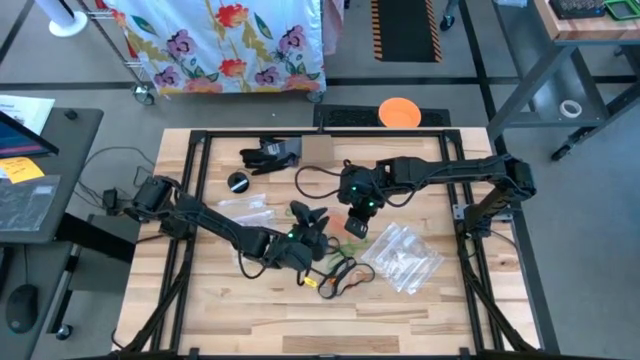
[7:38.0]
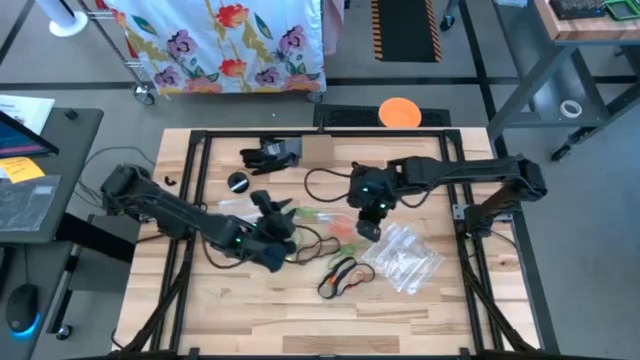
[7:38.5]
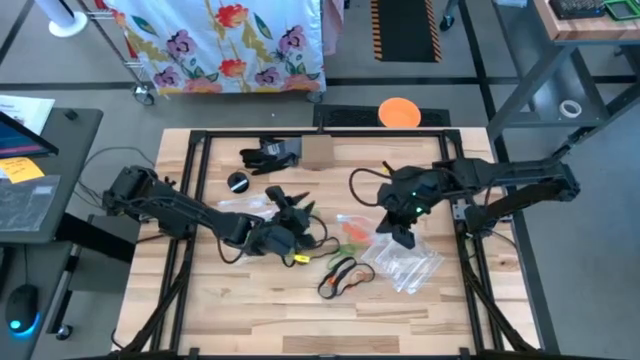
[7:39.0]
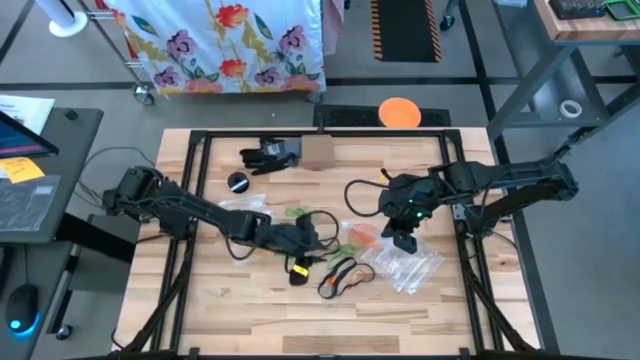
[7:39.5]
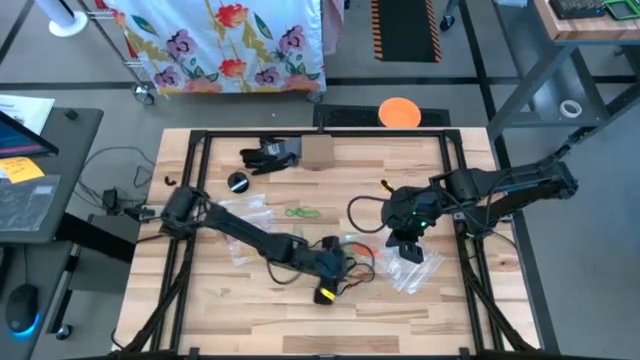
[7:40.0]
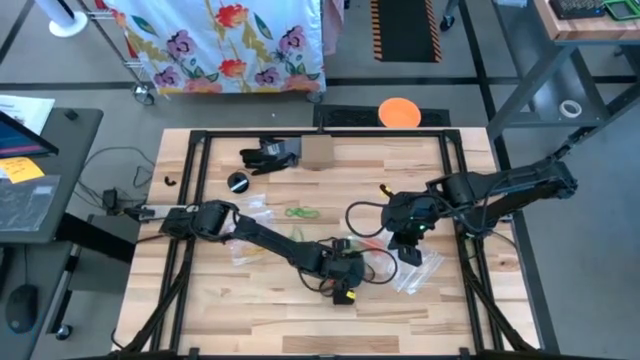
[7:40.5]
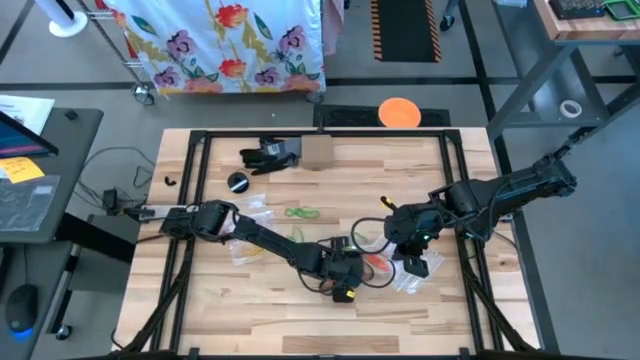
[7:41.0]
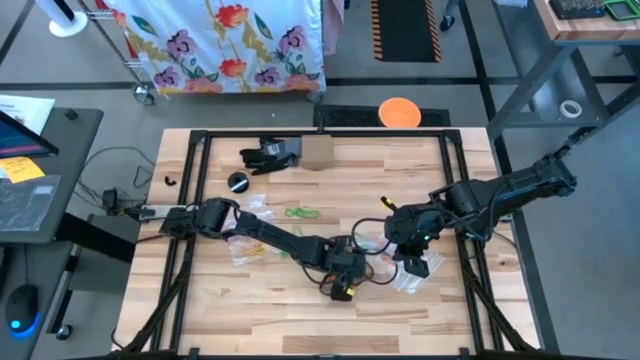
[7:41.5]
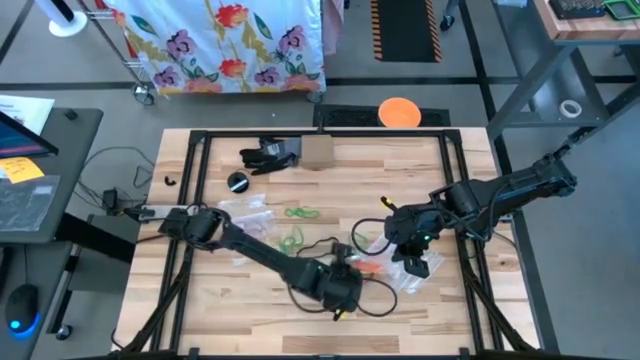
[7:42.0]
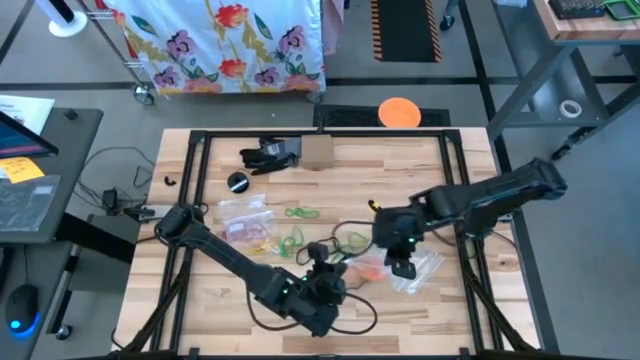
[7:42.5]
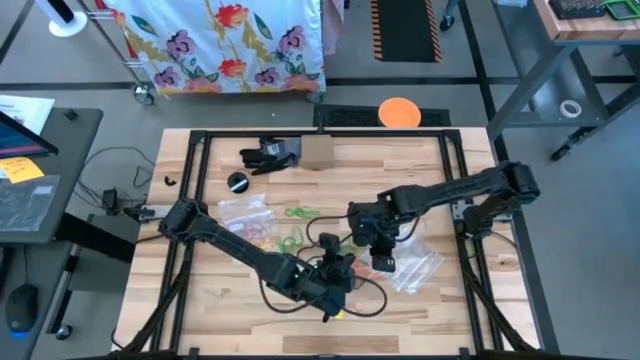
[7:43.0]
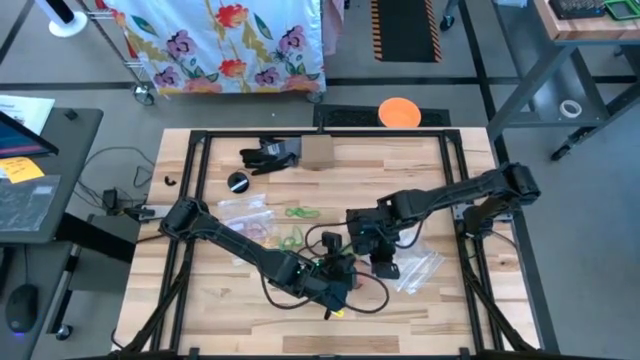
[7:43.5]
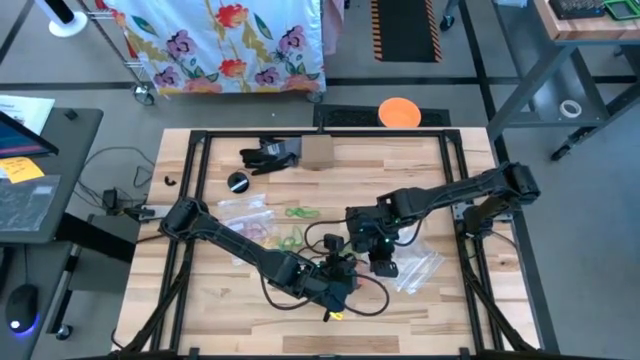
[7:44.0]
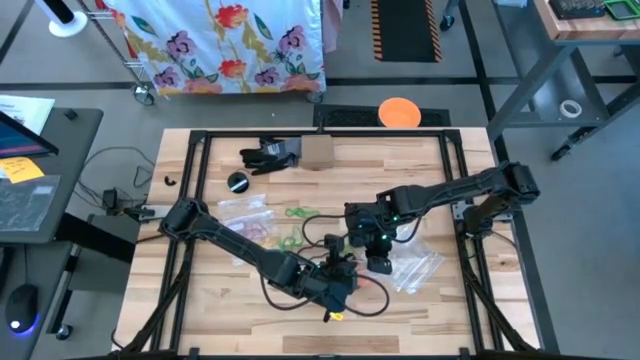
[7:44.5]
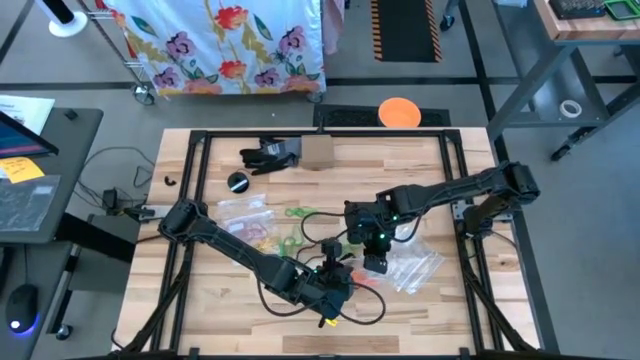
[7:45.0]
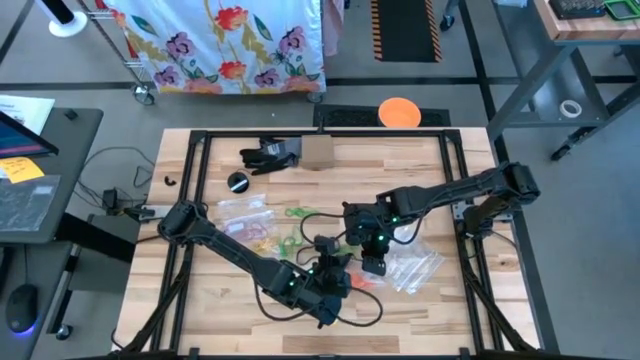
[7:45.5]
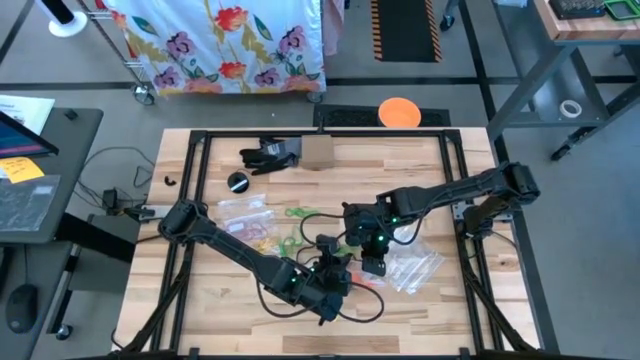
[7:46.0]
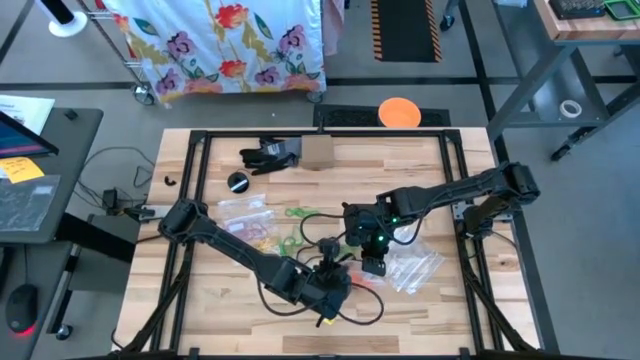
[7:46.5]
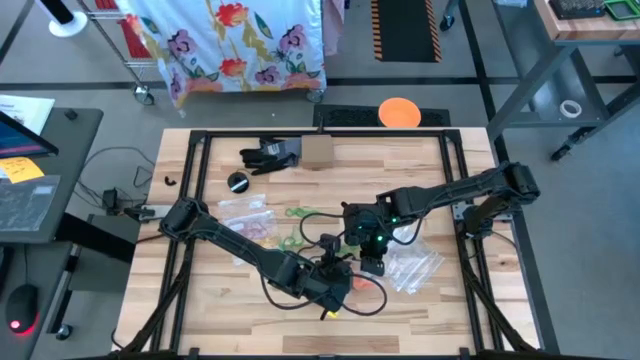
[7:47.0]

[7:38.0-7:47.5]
Task: Sort rubber bands
Put the orange rubber band into the transparent zip bag

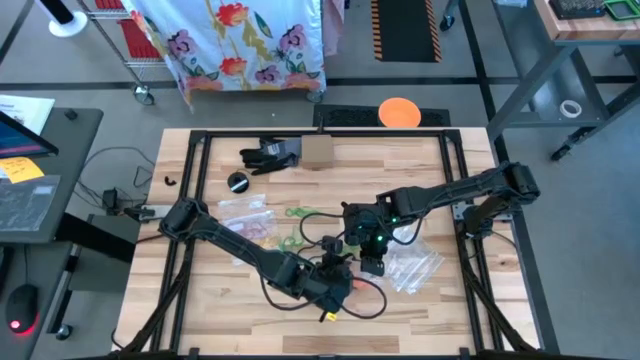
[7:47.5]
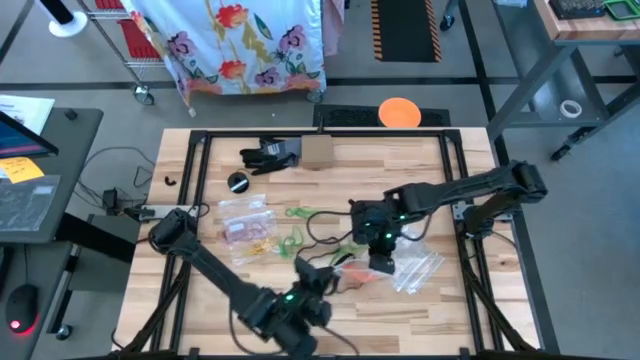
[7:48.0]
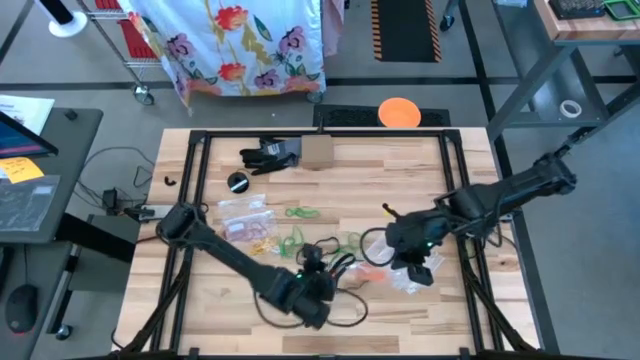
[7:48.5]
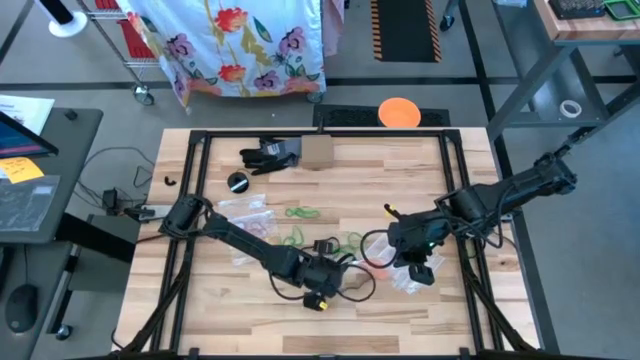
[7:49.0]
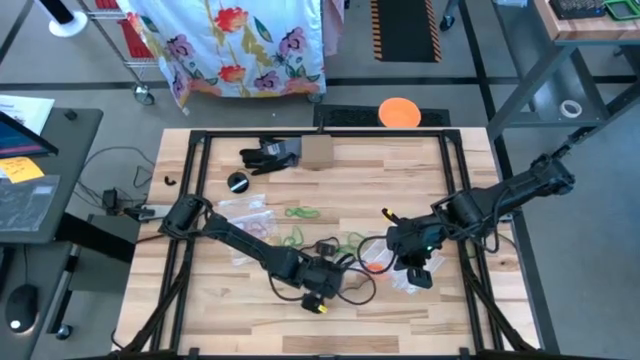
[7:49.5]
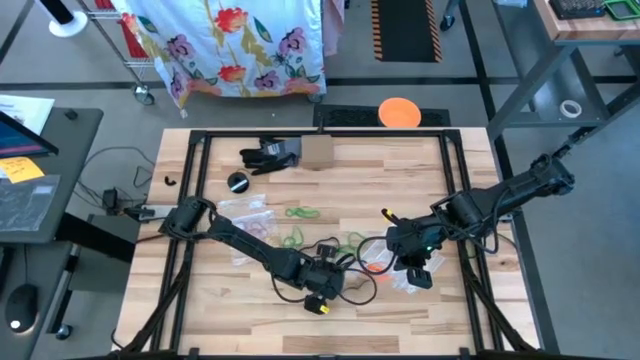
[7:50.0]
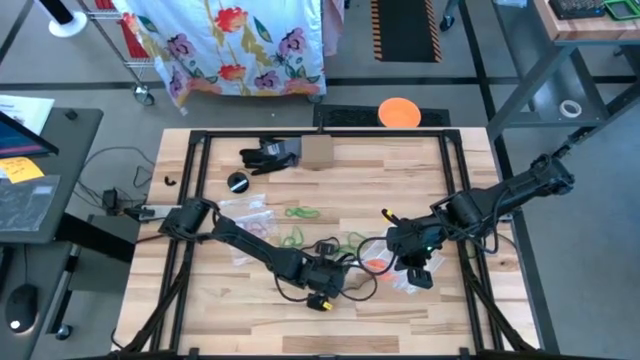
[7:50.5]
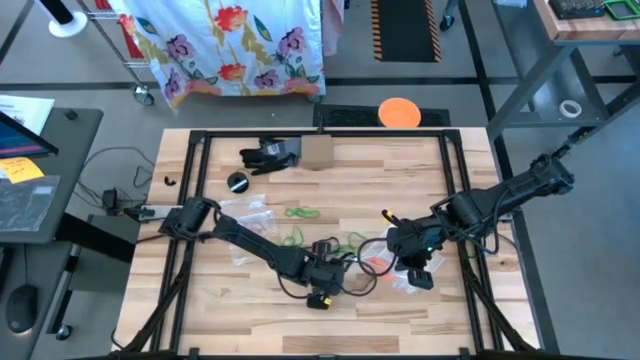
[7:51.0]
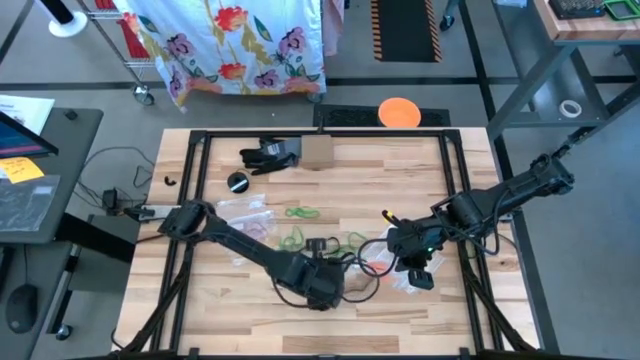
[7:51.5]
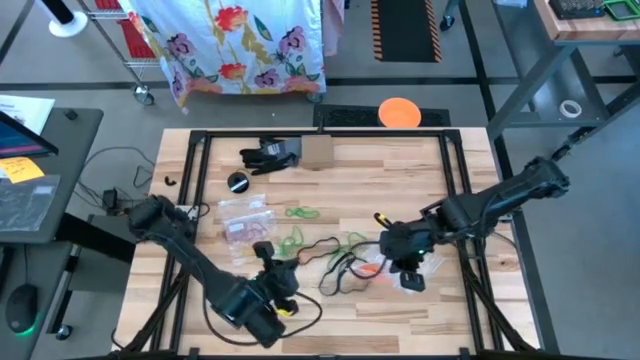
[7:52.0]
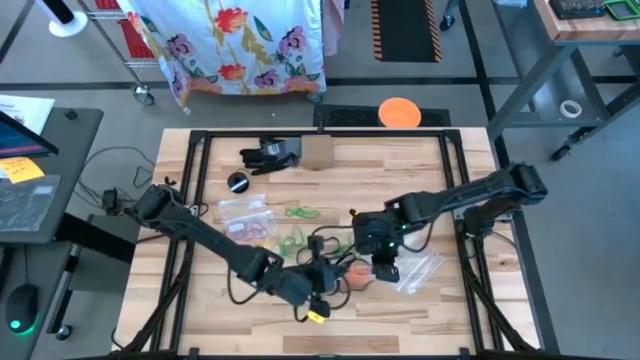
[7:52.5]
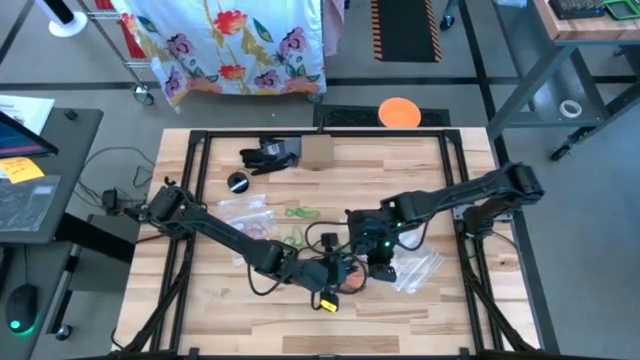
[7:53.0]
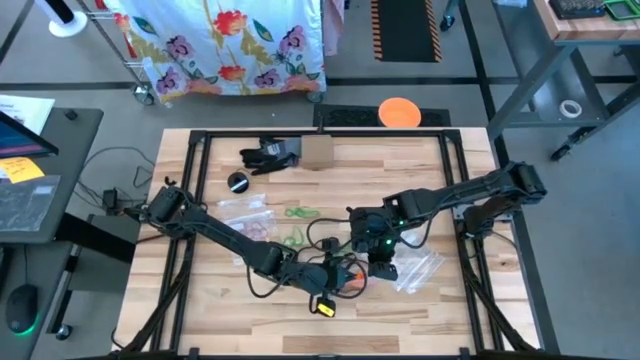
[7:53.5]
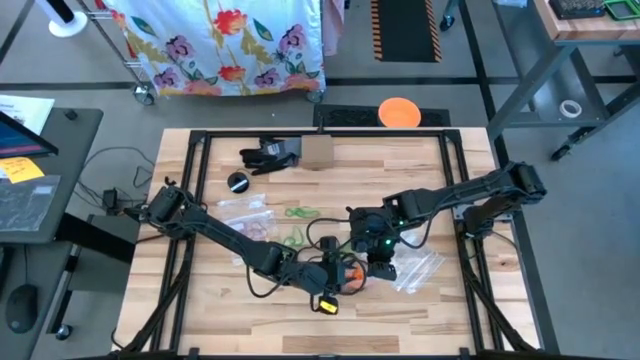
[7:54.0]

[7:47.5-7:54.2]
Put the orange rubber band into the transparent zip bag

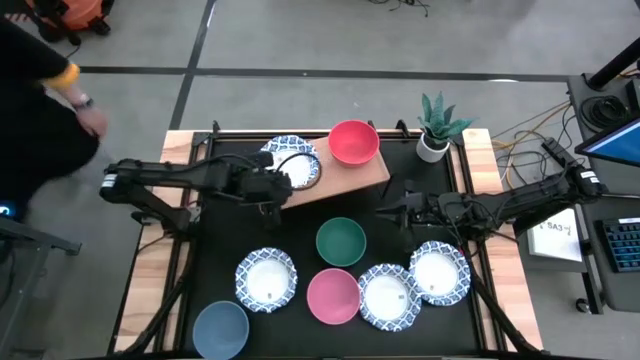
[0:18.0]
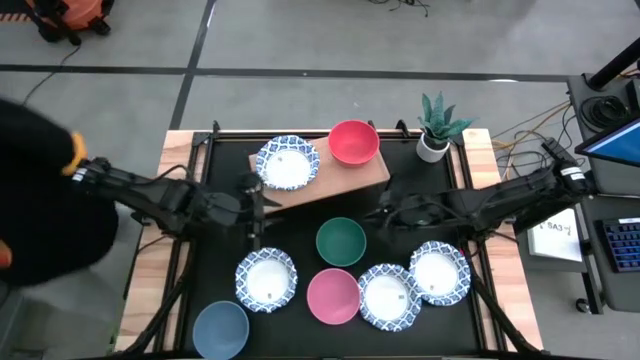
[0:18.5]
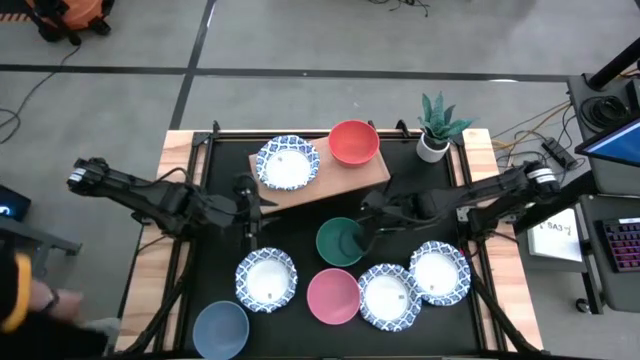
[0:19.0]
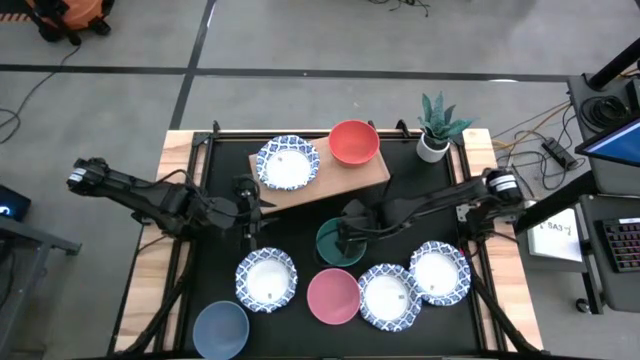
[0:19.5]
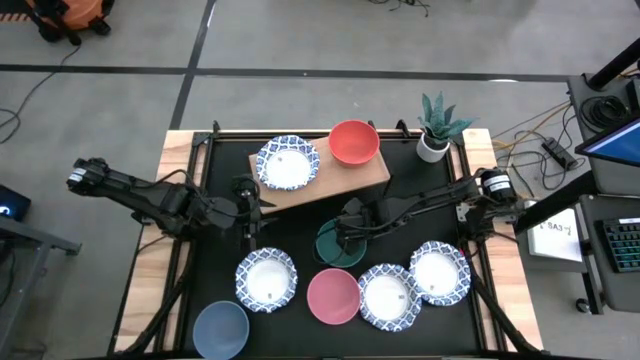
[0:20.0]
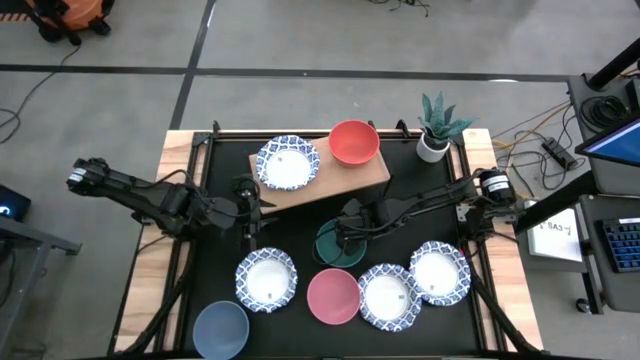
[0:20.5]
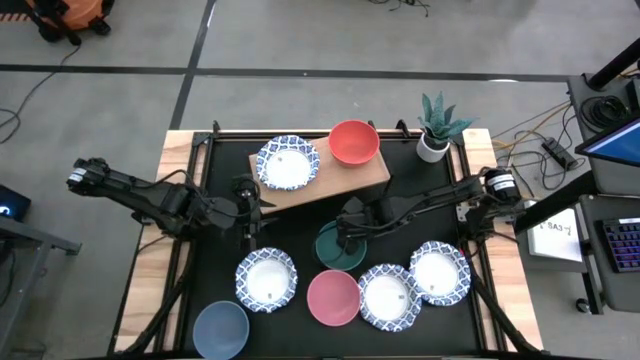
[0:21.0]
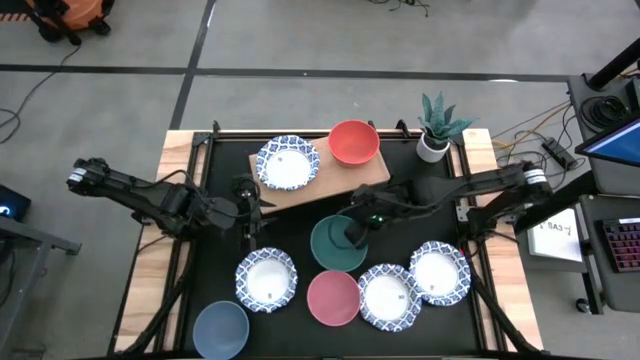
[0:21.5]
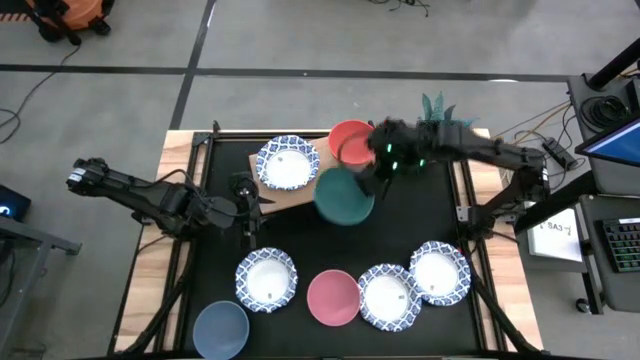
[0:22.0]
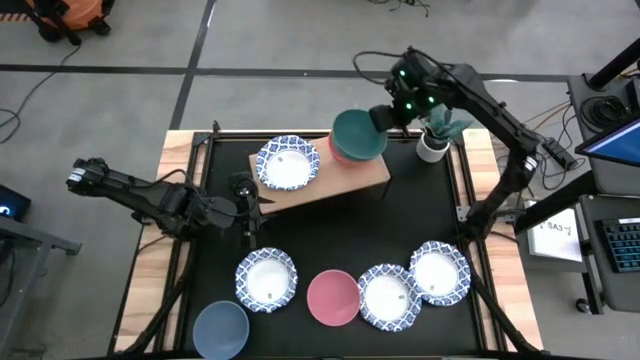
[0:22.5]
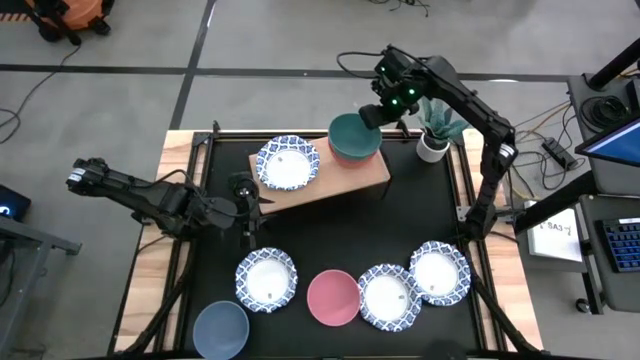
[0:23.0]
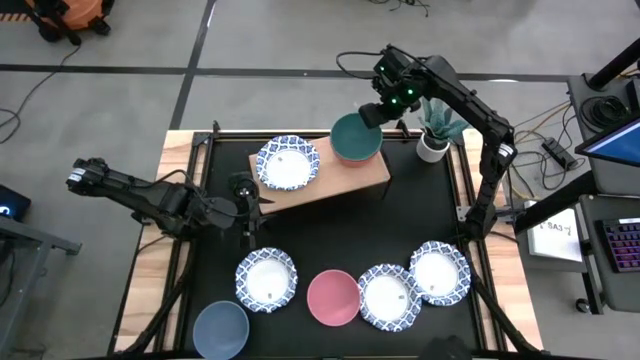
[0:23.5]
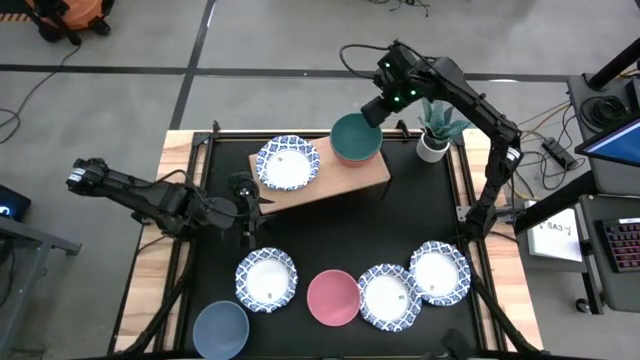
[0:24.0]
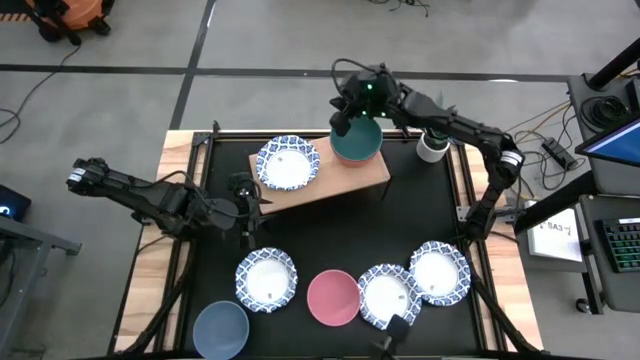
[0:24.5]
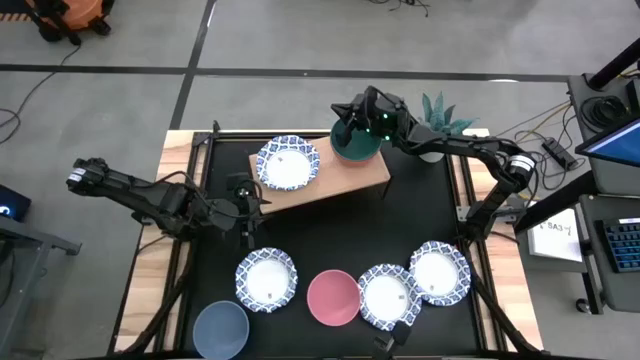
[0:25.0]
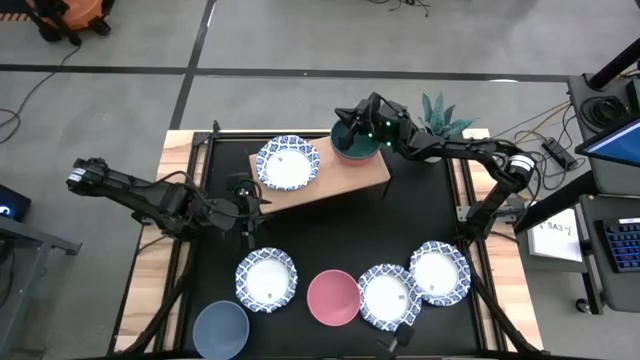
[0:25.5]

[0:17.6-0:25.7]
Task: Place and stack bowls onto a shelf
Stack the green bowl on top of the orange bowl
